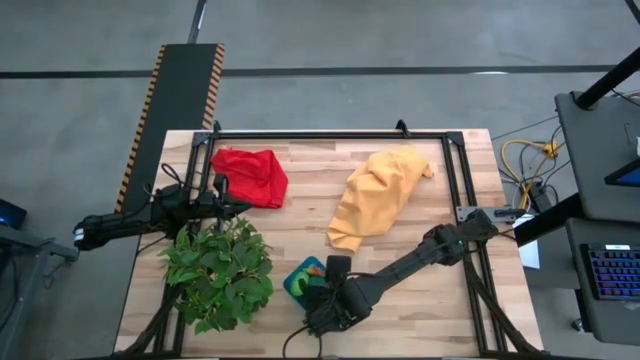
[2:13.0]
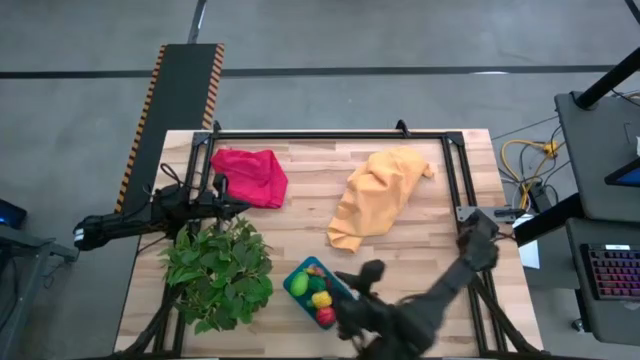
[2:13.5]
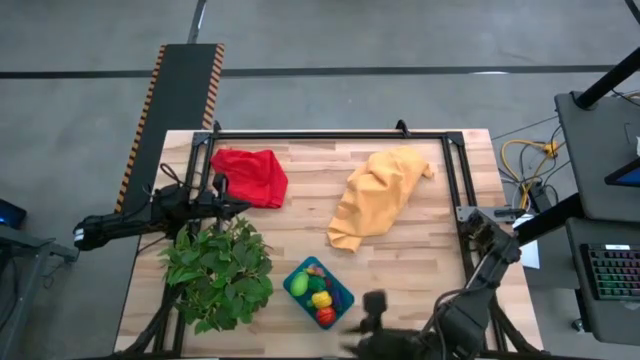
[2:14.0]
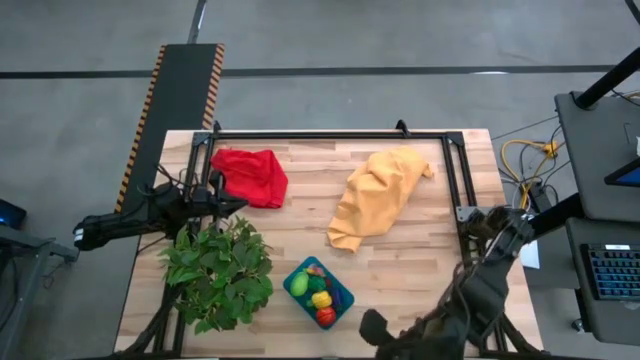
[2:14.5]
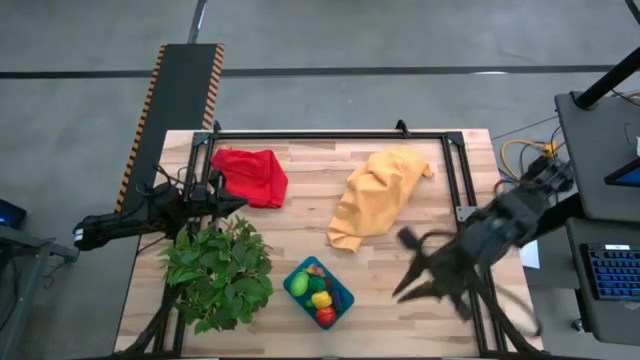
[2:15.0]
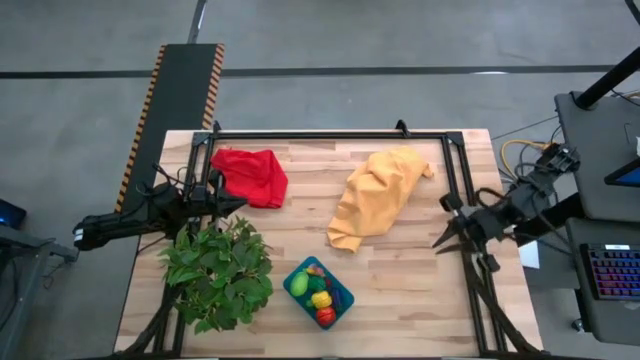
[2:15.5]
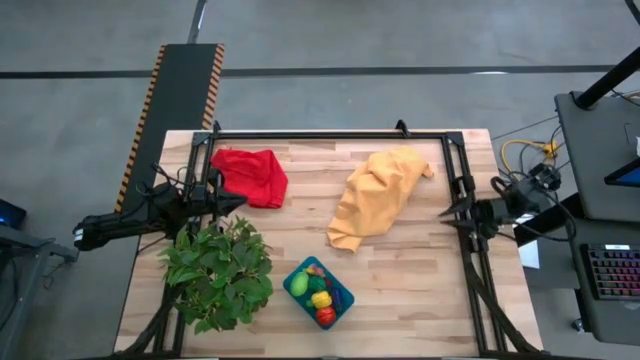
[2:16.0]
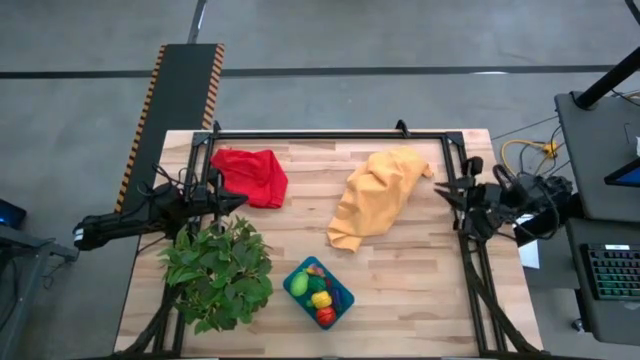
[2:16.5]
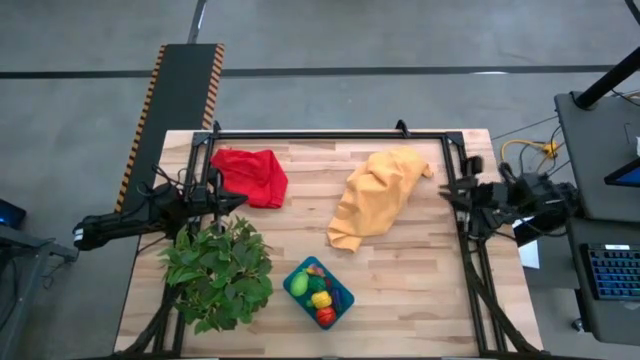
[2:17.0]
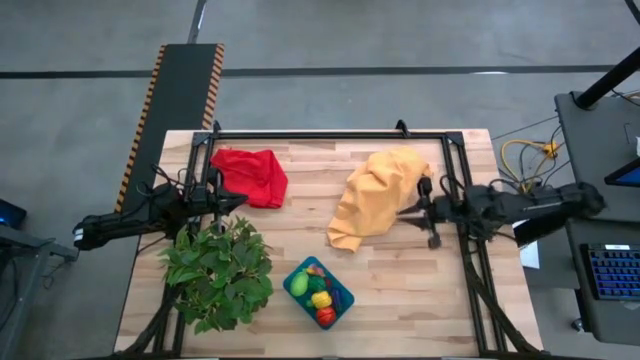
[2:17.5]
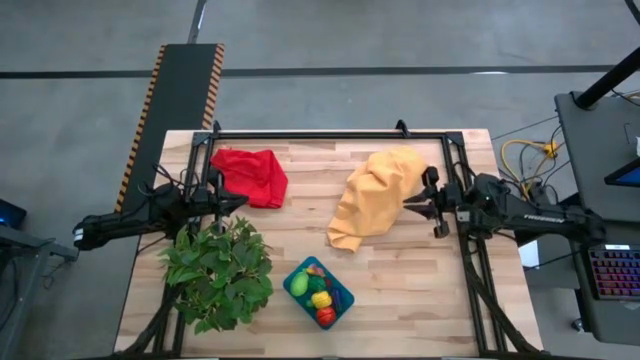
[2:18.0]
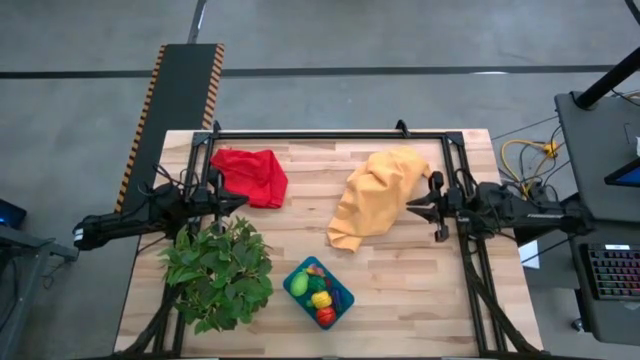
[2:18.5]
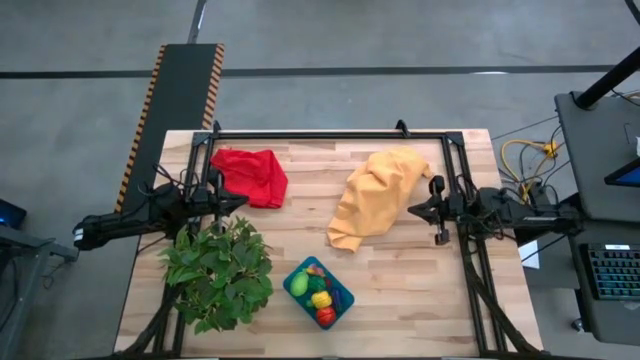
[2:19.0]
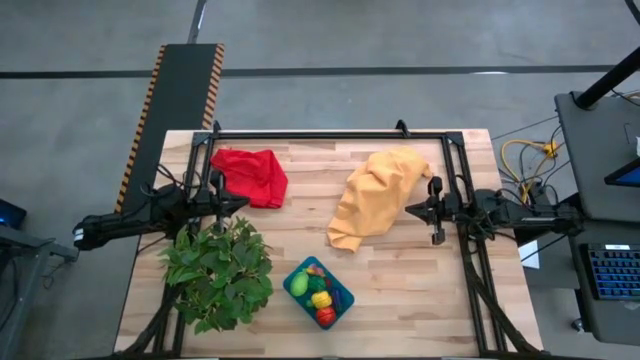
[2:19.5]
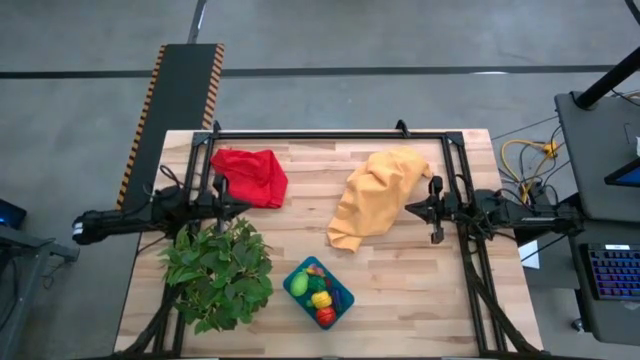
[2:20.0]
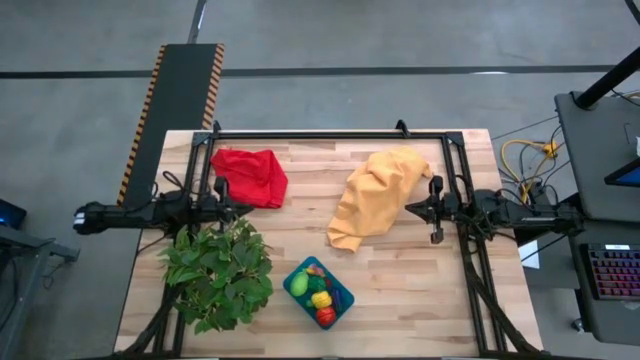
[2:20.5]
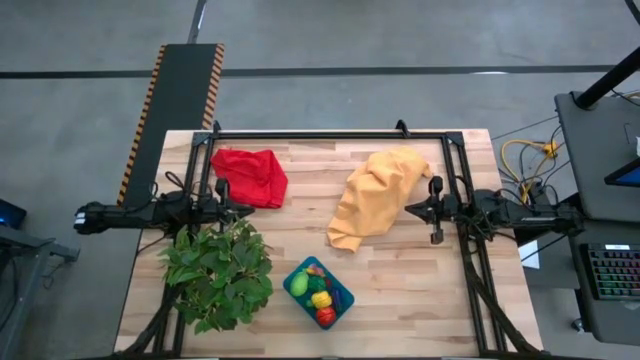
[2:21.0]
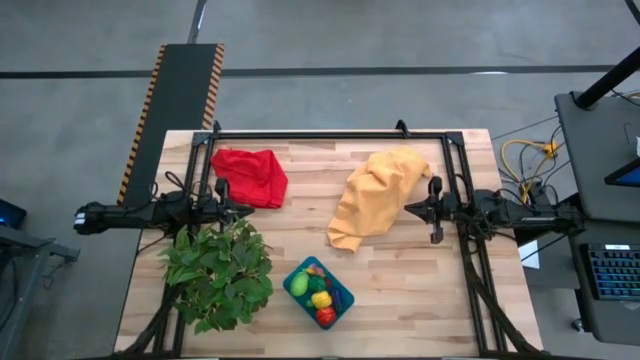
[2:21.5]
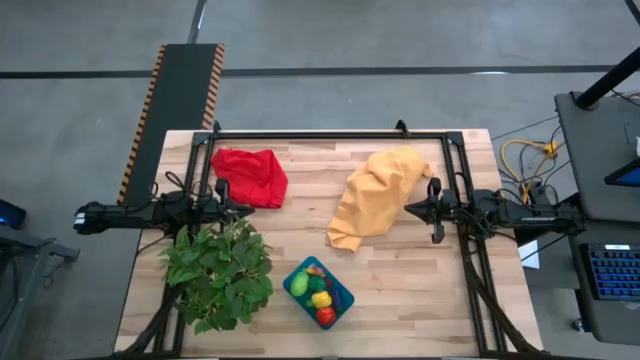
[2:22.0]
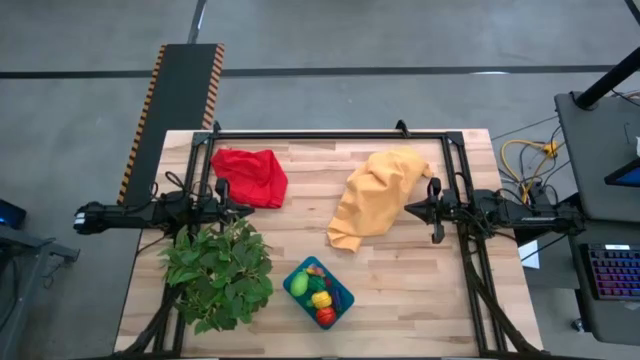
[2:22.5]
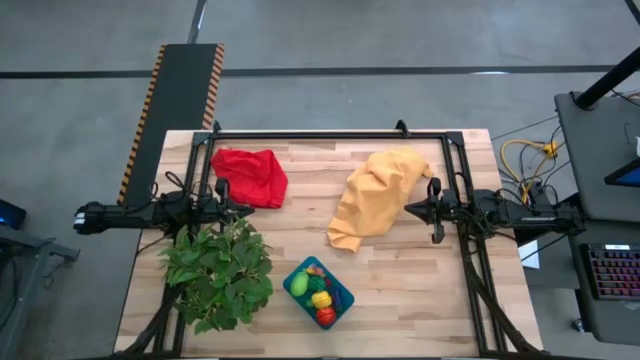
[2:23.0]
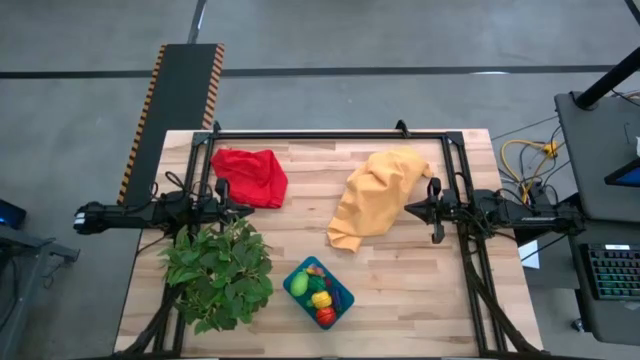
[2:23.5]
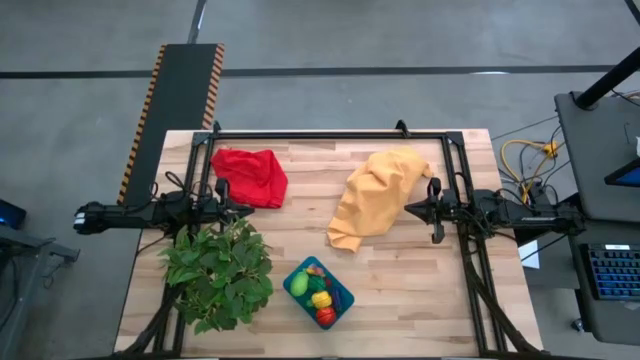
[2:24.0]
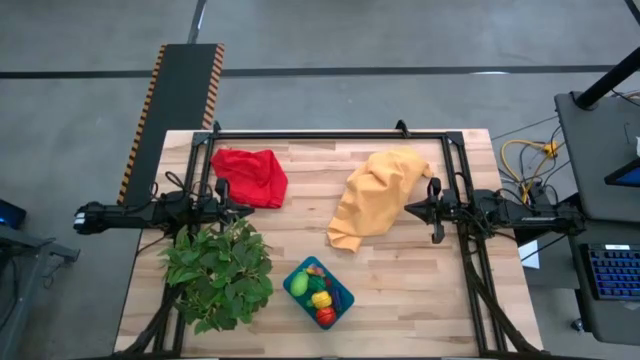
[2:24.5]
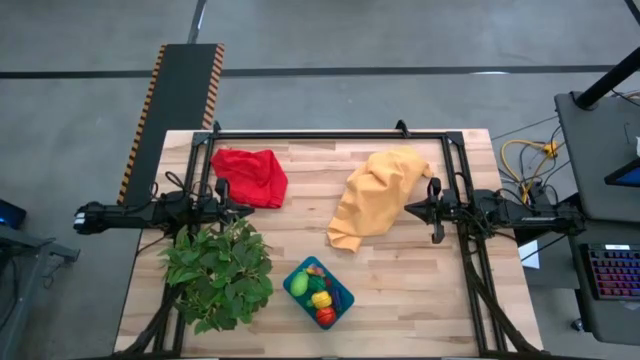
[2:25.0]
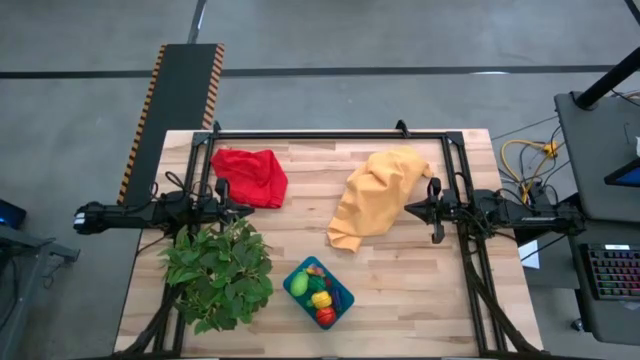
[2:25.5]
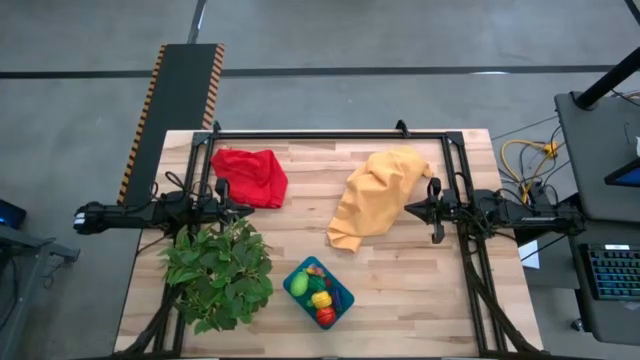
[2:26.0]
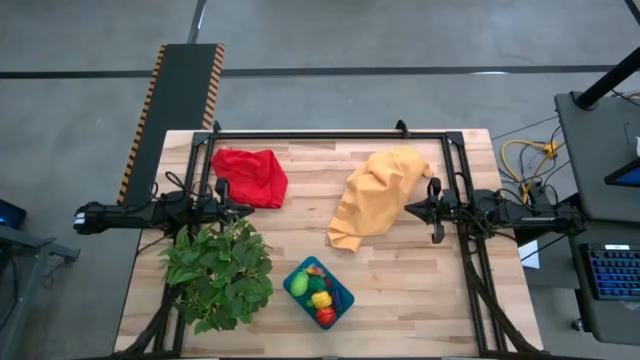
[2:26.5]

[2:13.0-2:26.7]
Task: Pick and placing Produce into tupperware
Return to Home Position

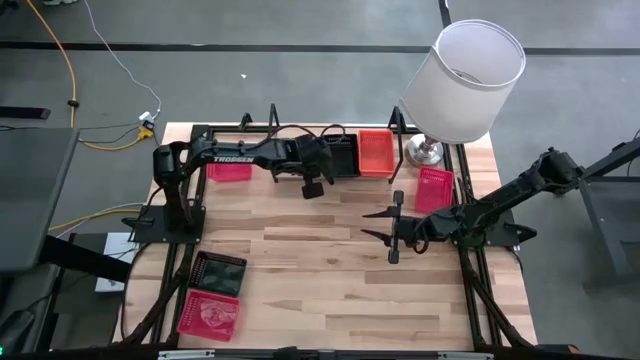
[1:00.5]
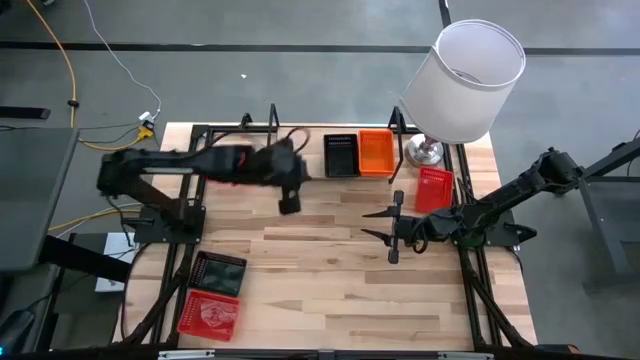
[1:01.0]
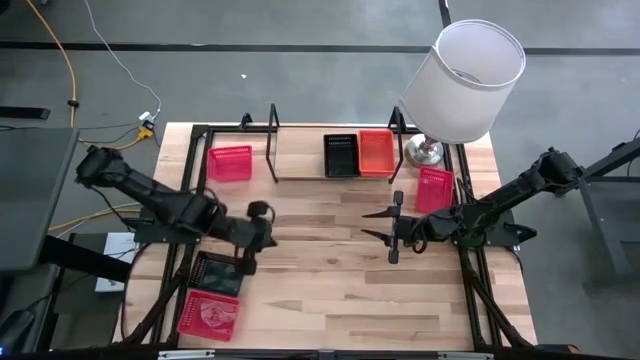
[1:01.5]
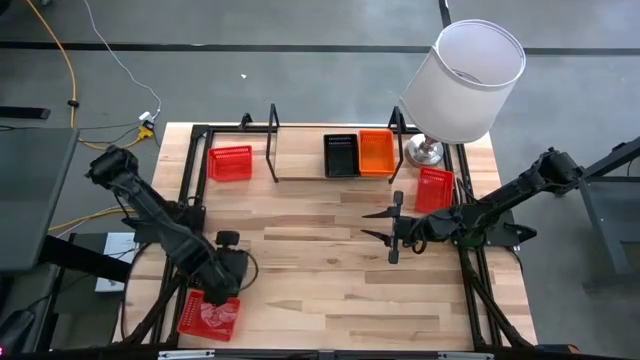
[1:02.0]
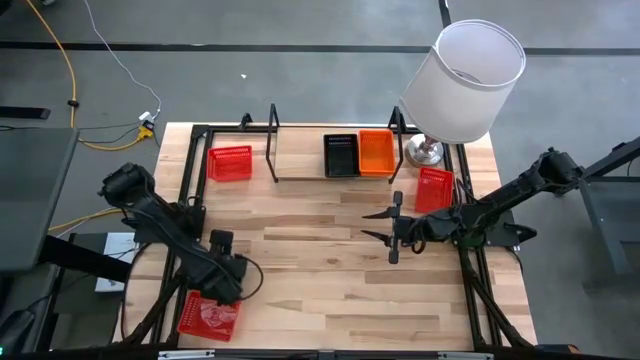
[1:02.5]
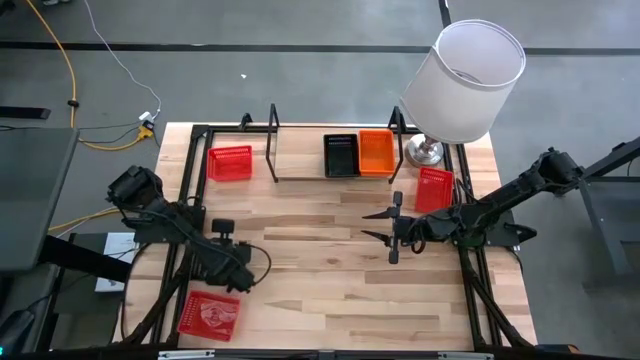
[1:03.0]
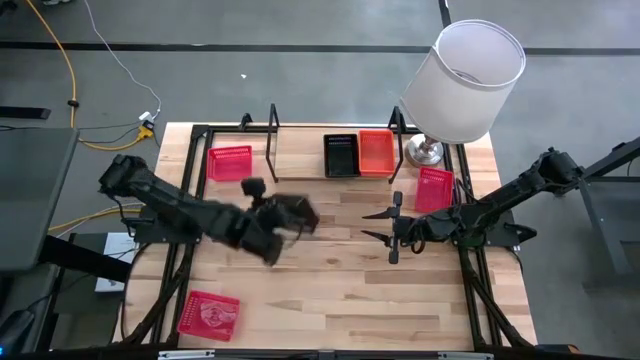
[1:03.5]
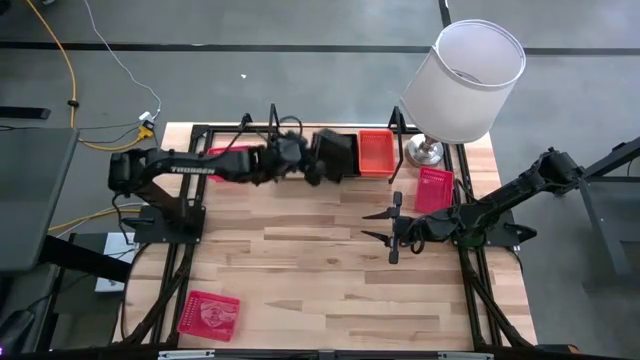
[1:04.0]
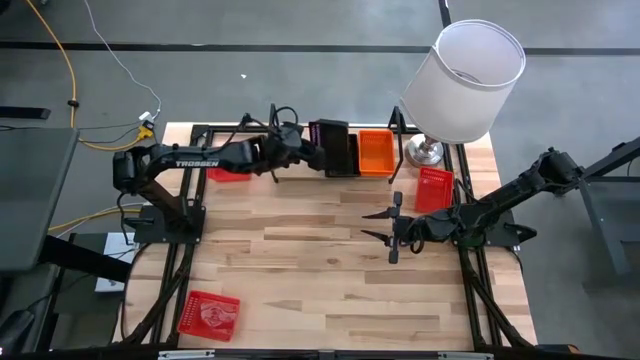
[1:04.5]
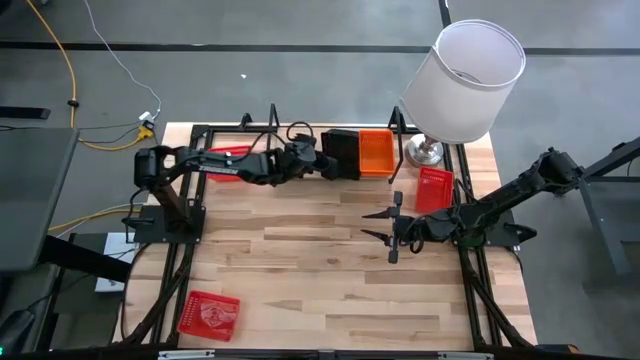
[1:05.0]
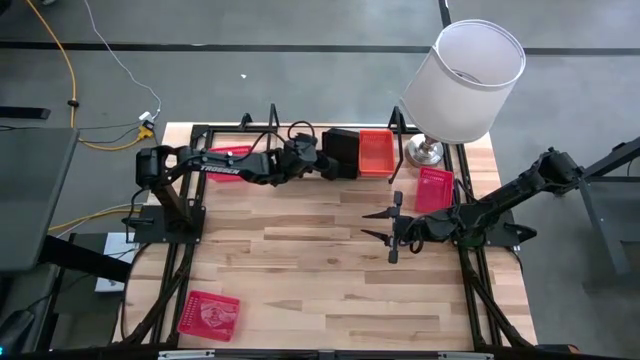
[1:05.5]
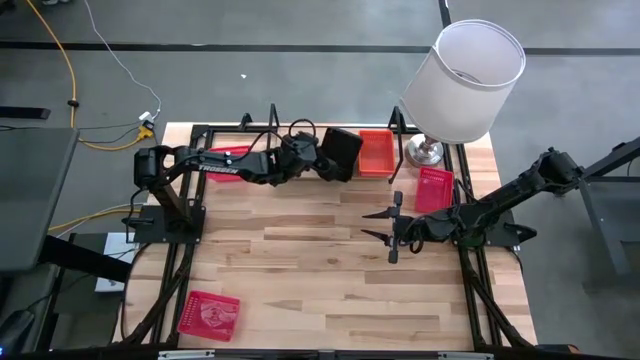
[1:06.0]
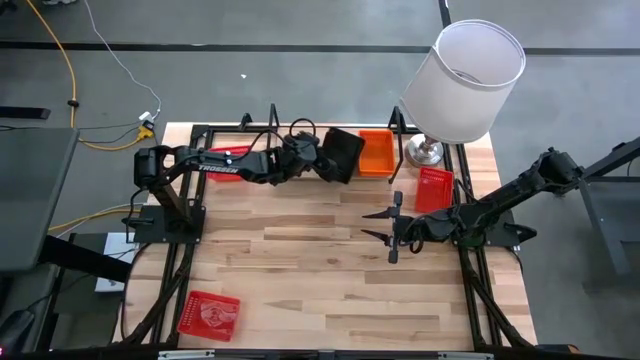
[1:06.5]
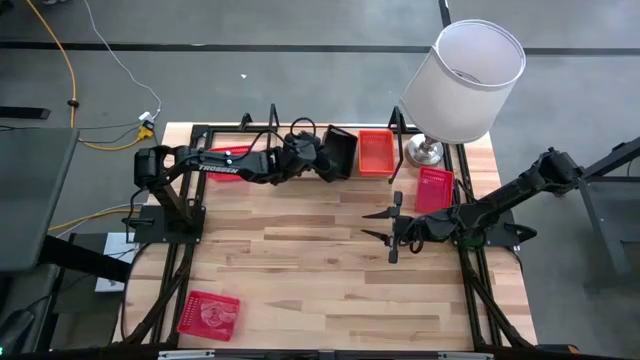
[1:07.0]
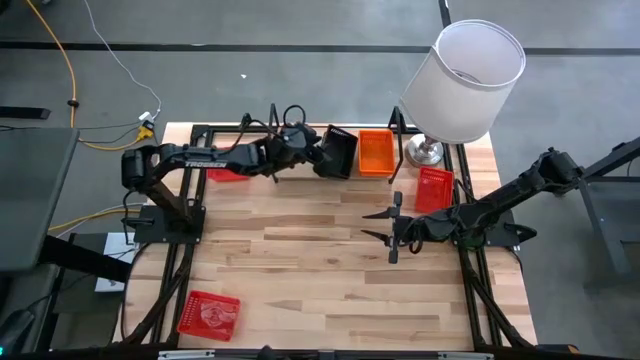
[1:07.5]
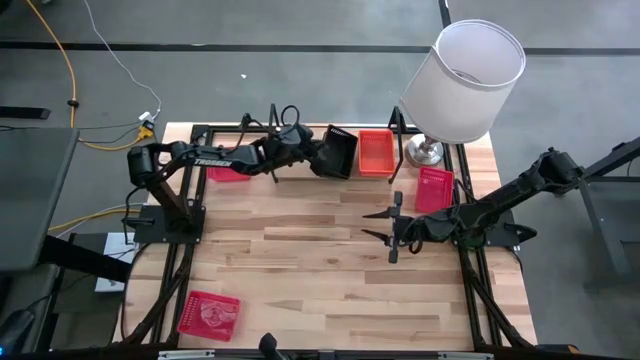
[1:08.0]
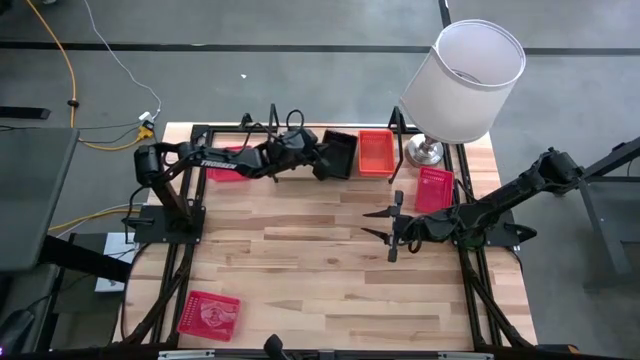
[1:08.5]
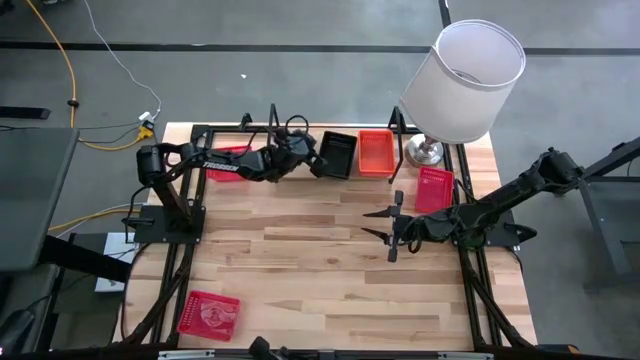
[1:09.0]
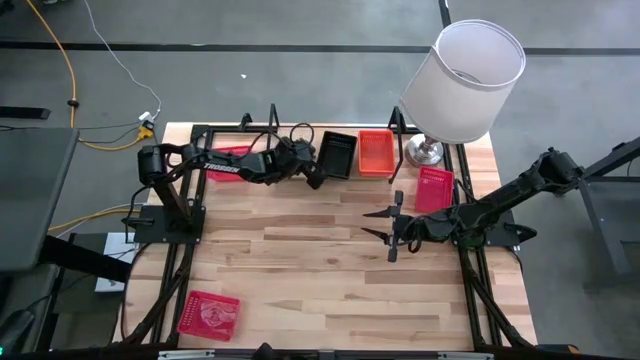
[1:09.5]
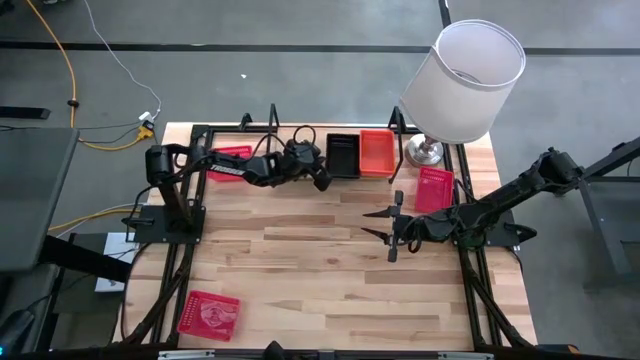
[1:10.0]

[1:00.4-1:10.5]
Task: Stack baskets on shelf by color
Stack the black basket on top of the black baskets on the shelf
